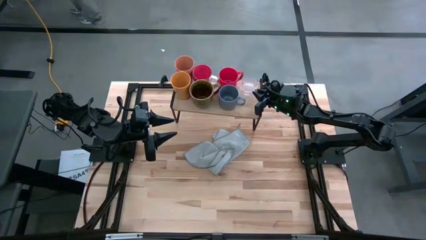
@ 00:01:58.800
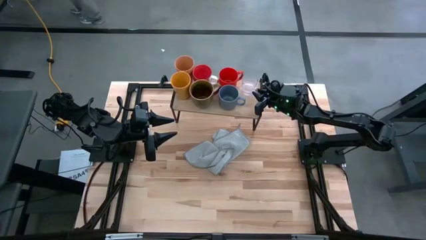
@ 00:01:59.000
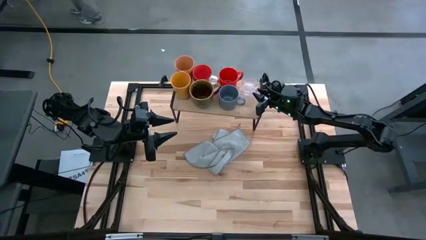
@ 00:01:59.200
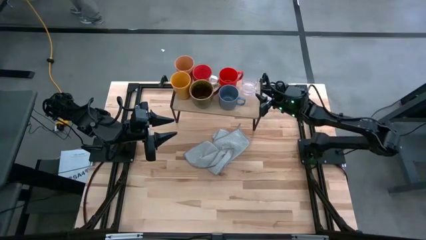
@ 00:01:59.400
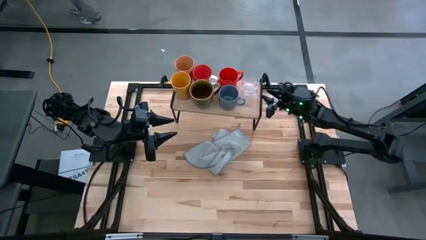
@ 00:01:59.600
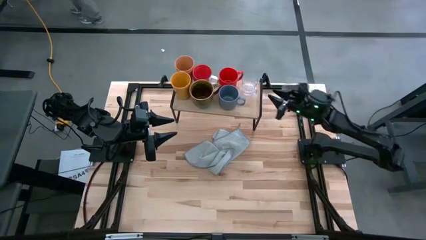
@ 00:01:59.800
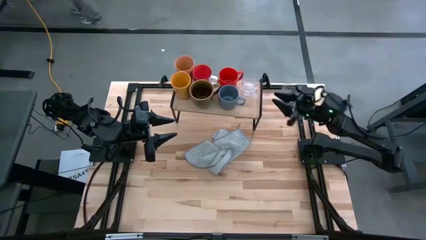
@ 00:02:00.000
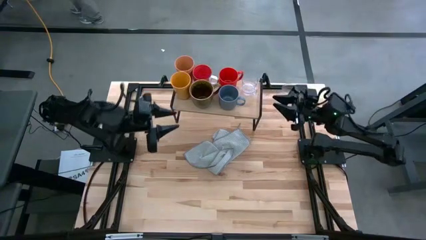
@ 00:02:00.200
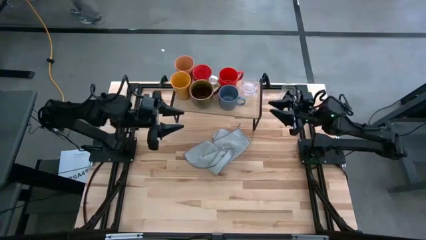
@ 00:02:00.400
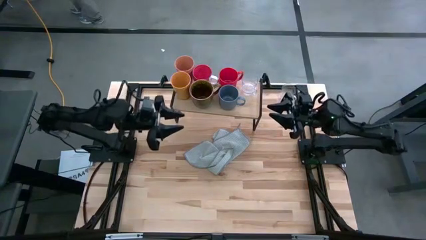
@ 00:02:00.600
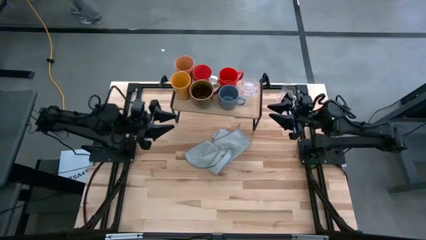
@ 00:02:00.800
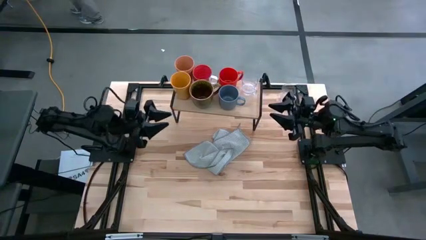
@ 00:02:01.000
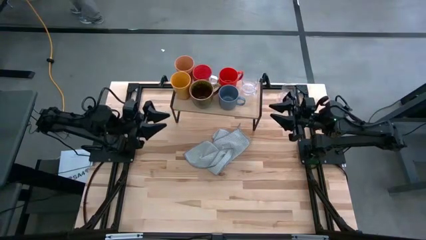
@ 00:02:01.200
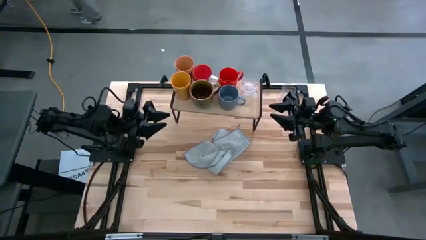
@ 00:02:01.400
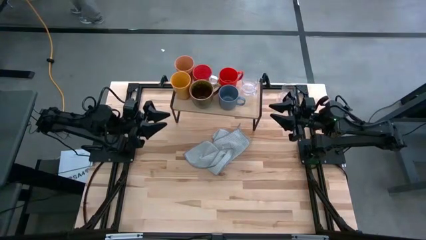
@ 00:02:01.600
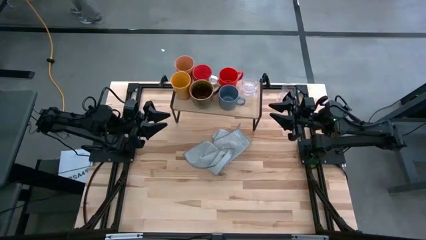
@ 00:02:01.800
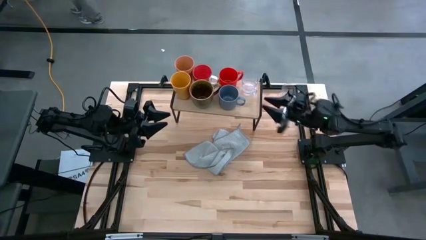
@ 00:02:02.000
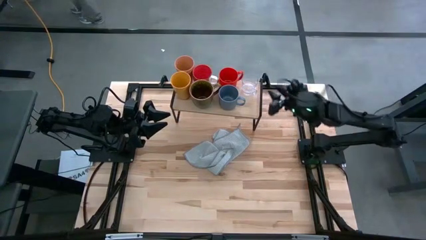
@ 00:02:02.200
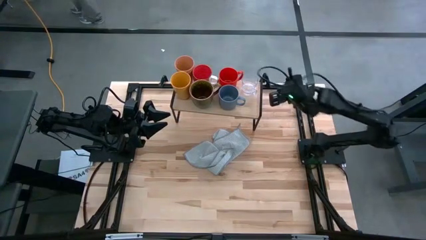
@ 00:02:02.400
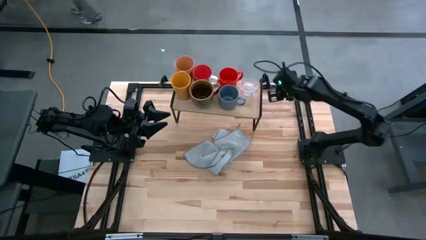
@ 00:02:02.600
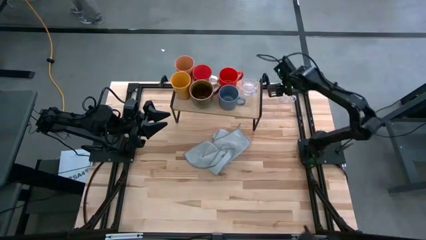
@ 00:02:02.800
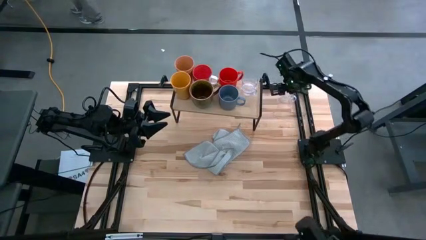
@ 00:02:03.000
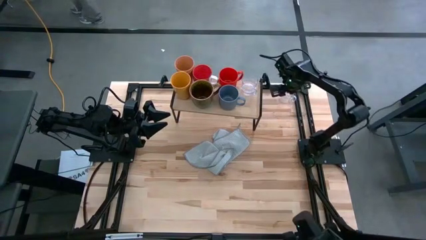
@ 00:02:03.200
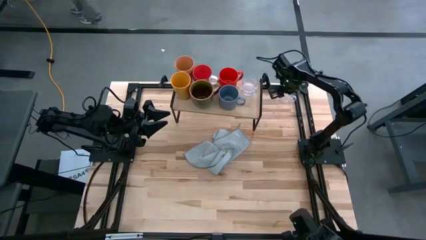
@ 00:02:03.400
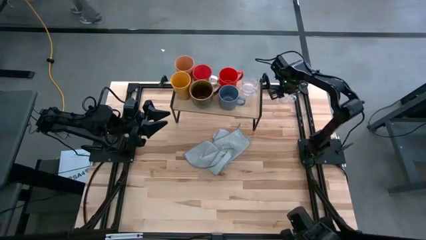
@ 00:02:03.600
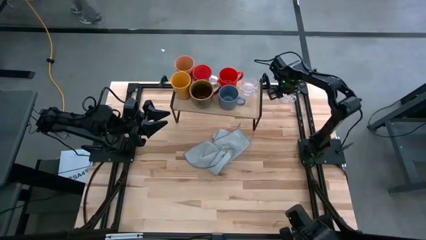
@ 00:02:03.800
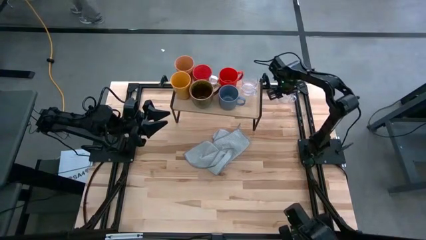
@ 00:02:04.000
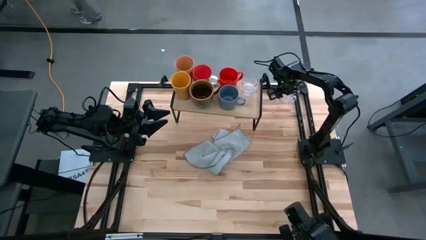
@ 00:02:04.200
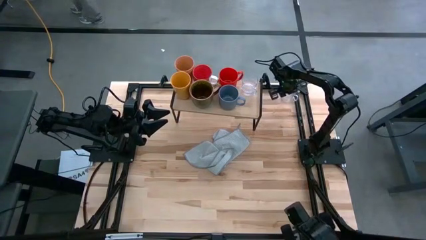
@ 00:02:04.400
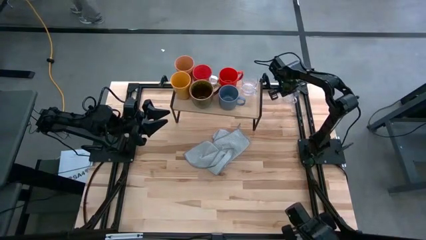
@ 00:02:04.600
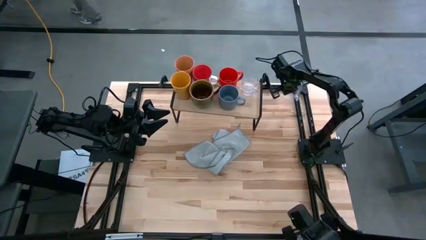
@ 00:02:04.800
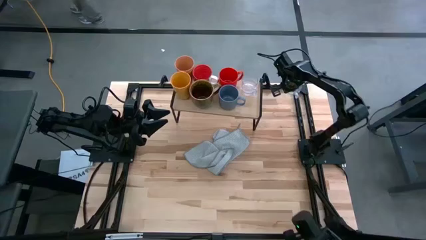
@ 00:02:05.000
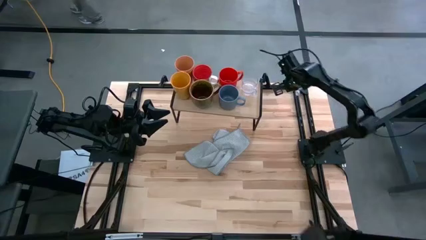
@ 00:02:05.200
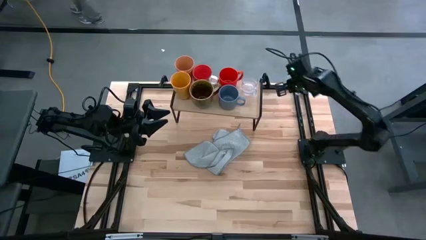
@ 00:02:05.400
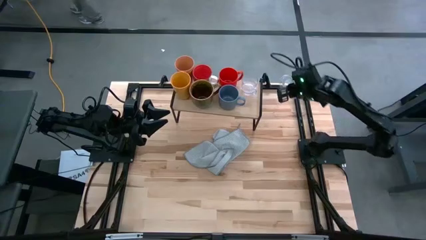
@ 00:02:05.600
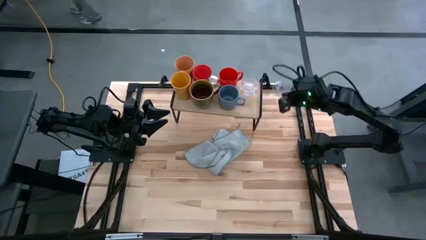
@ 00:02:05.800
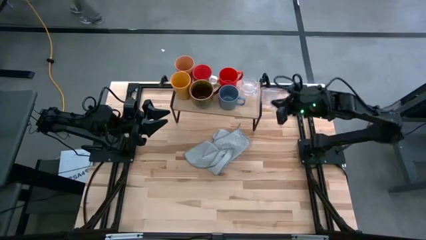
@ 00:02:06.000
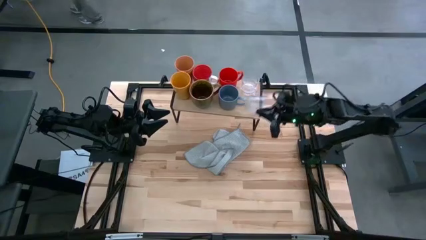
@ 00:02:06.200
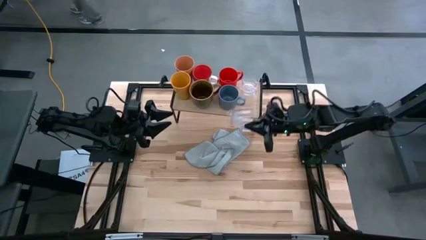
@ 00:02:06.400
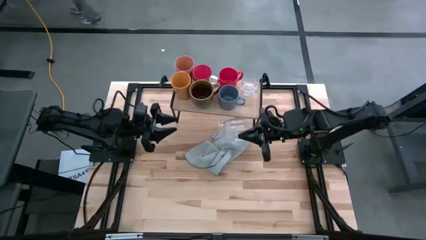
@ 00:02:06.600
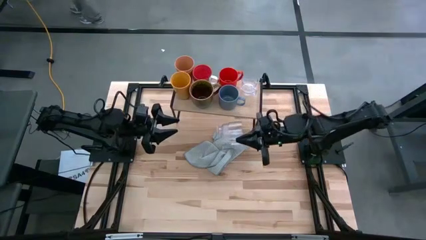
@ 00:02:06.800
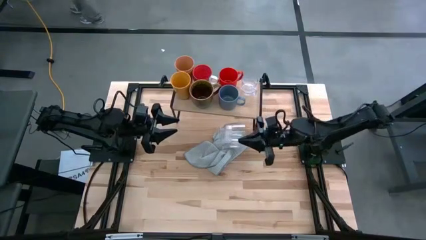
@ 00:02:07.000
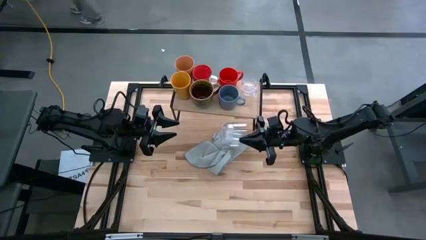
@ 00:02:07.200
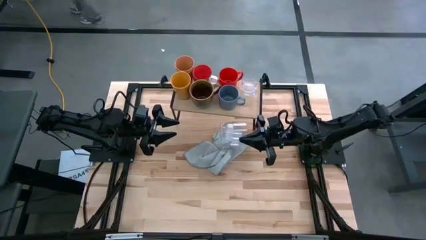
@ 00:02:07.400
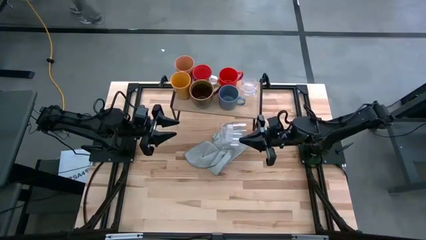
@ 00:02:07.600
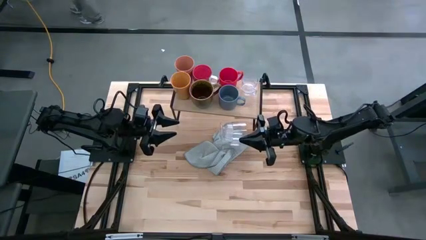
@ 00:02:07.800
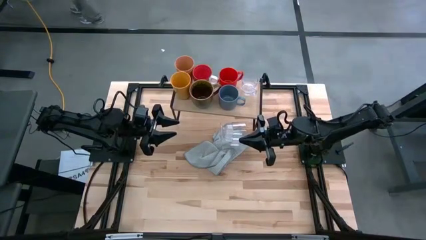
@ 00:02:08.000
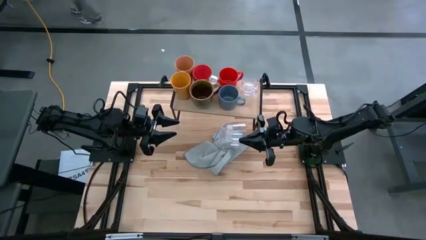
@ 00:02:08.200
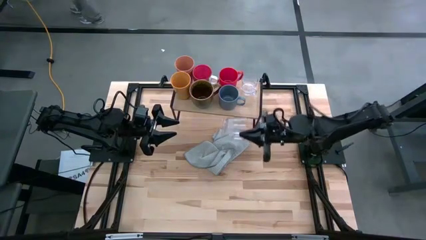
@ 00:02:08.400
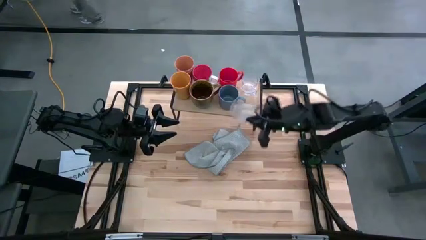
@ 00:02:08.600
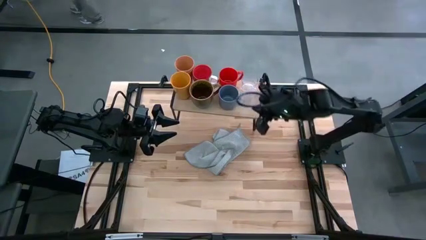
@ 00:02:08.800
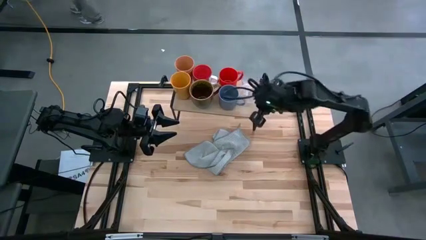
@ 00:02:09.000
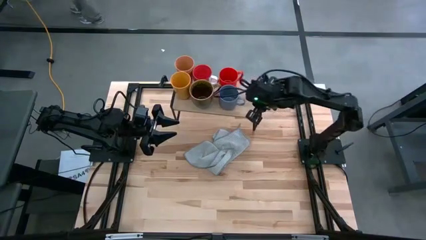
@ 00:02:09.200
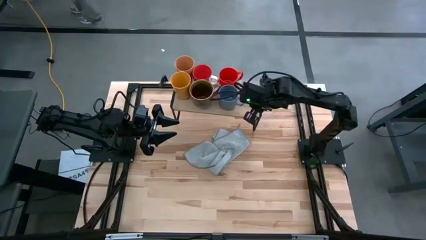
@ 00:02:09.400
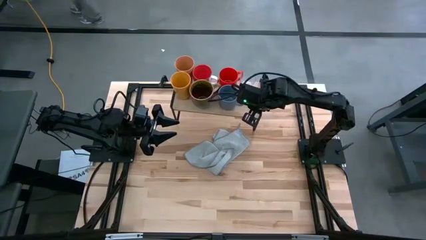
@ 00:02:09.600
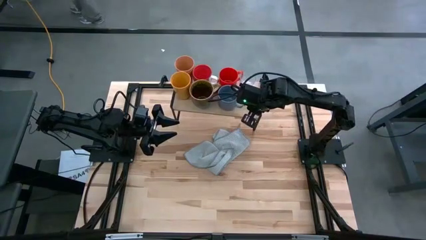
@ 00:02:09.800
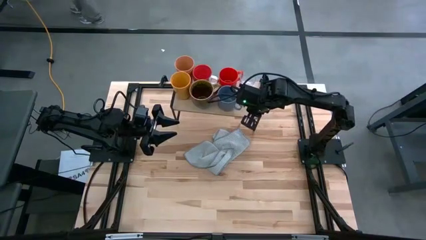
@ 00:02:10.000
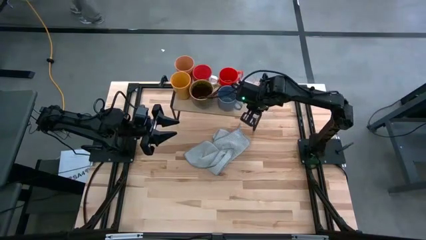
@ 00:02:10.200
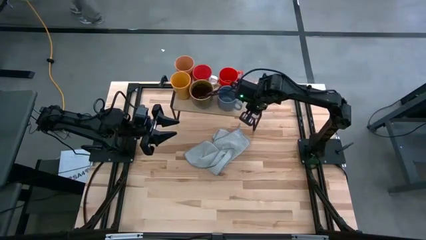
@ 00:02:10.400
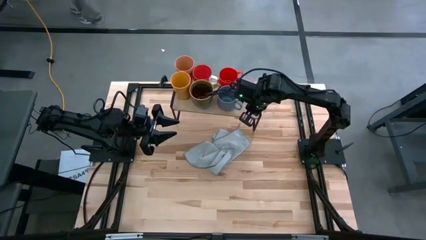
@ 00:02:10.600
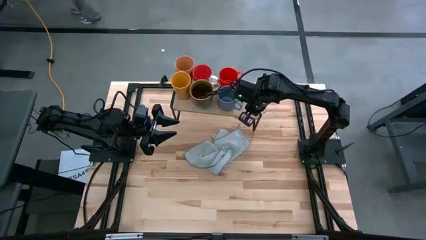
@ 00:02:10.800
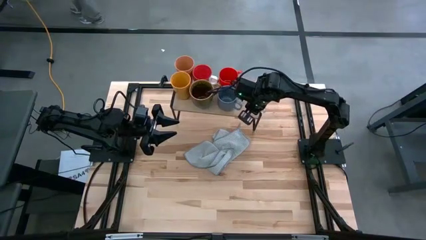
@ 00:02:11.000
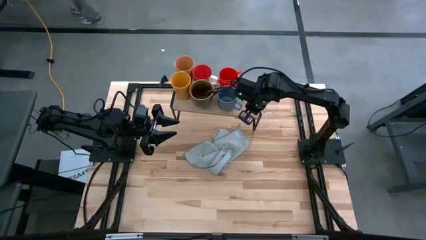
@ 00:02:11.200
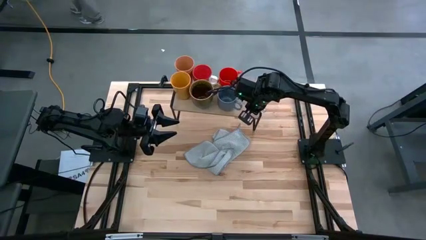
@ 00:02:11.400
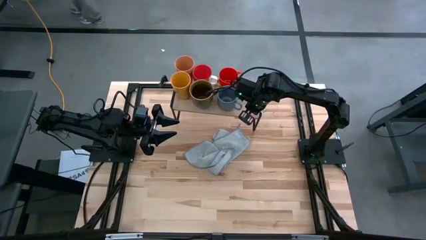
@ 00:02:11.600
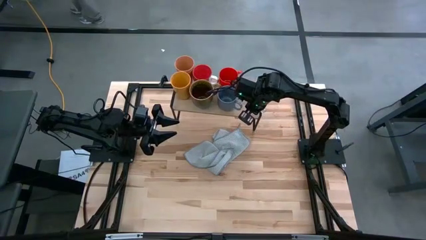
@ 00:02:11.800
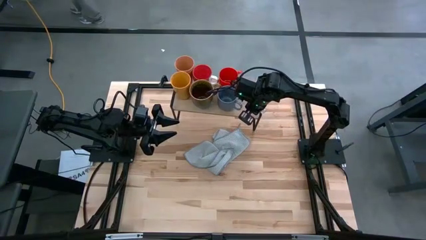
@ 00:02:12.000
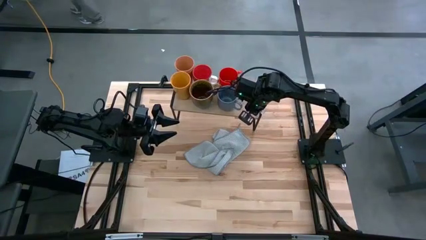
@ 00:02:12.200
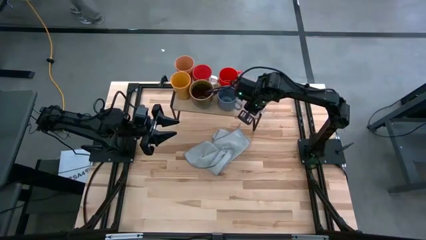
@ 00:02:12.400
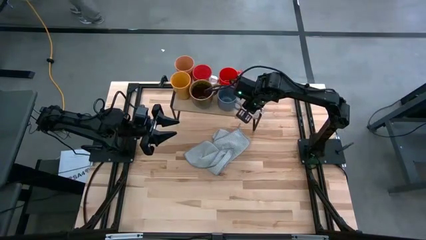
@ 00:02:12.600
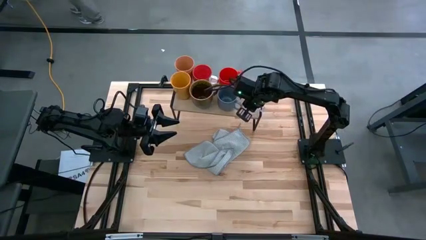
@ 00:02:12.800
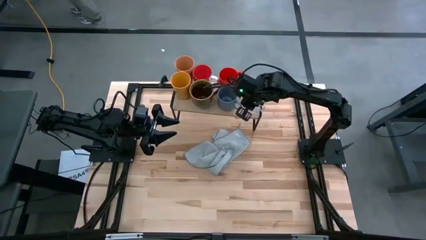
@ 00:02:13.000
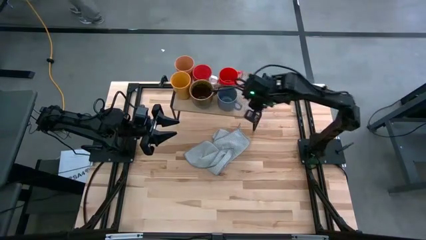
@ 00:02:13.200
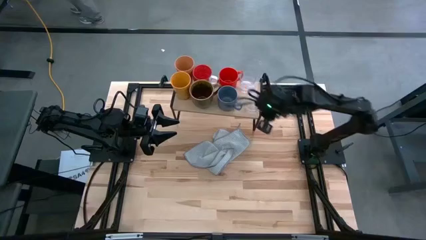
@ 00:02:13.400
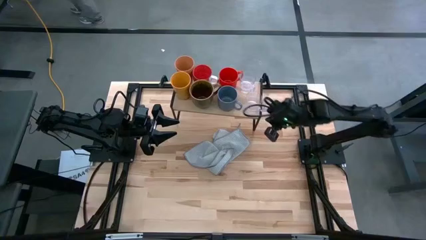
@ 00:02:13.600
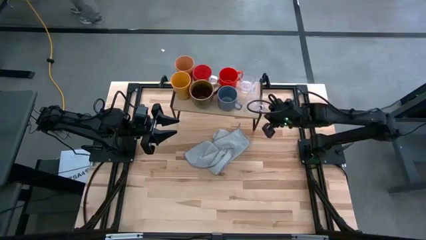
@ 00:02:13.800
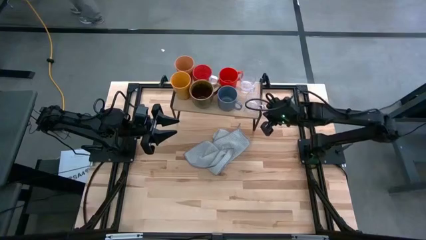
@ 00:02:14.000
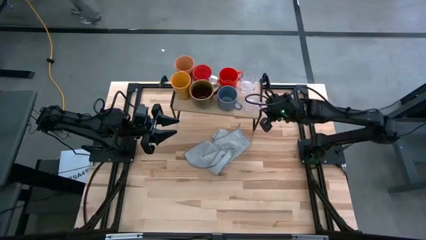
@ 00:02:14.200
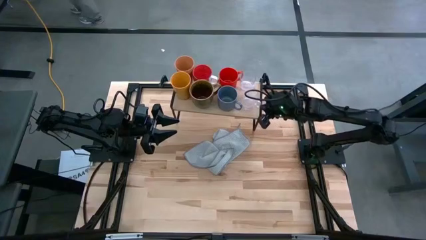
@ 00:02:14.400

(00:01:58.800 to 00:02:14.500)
Task: Stack small to large cups/mugs on shelf
Put the transparent mug on the shelf

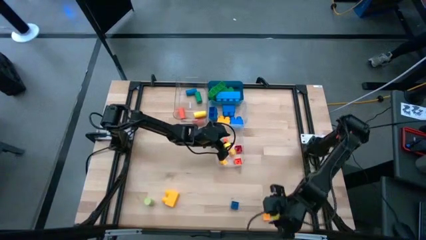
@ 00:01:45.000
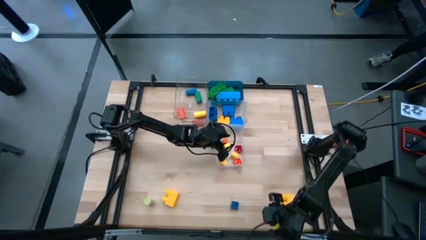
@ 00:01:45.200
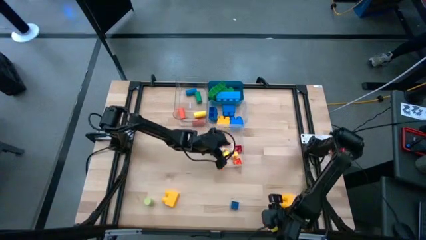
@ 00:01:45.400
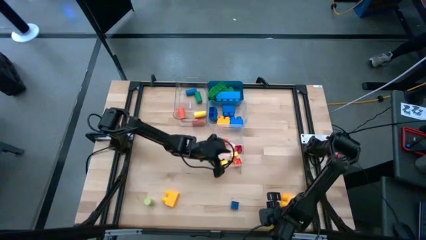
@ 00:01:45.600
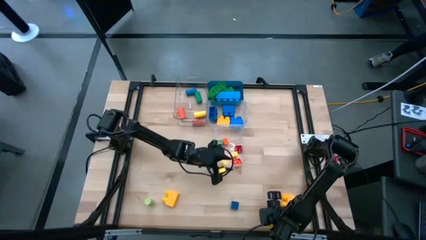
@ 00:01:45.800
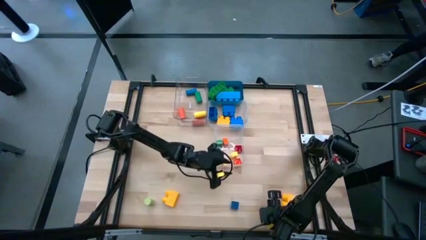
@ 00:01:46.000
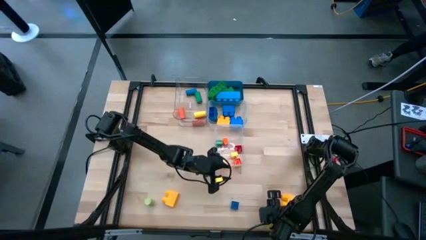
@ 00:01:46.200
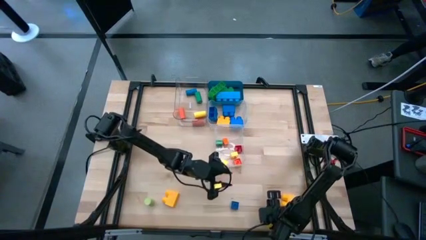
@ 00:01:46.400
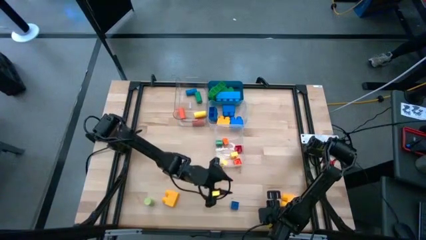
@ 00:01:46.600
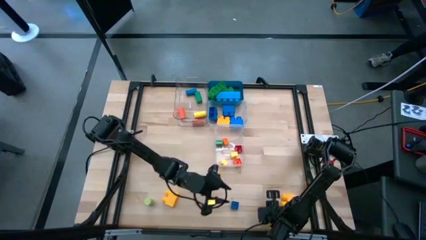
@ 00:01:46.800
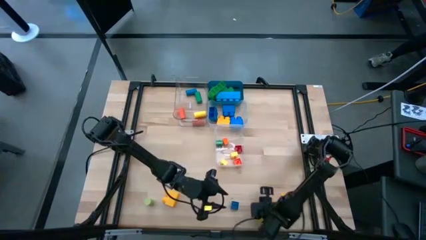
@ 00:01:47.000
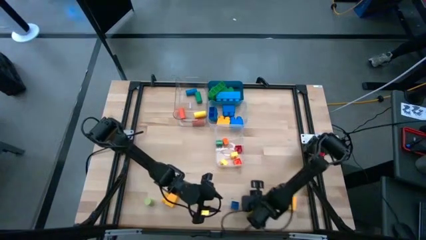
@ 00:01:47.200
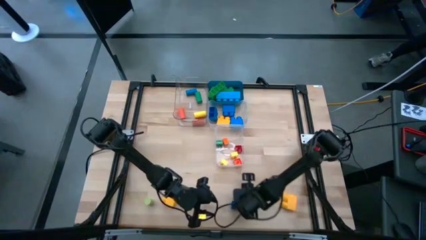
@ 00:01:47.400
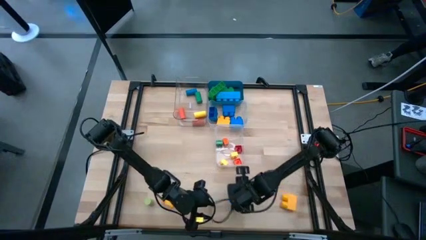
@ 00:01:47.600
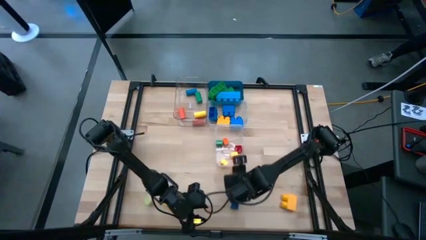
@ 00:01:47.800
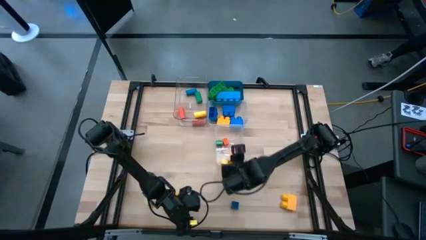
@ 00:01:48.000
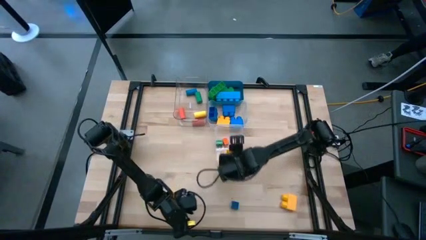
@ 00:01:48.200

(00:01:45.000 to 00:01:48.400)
Task: Sort blocks by size
Put the yellow 4 stud small game piece into the bottom transparent bin
